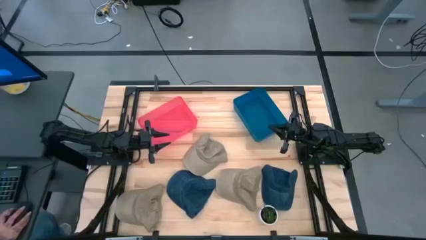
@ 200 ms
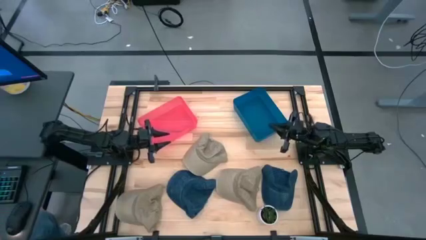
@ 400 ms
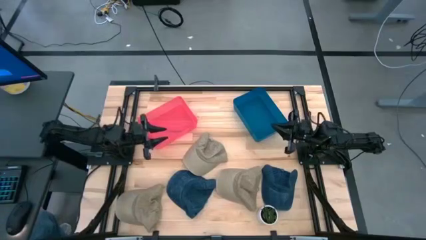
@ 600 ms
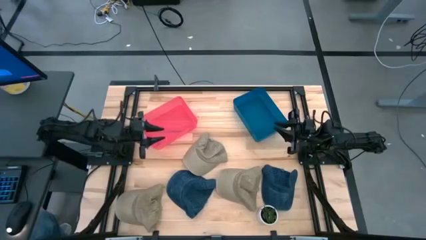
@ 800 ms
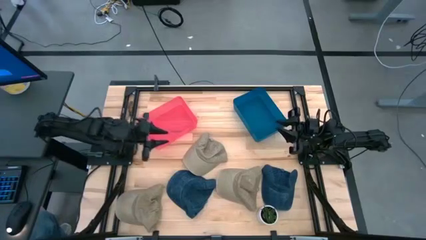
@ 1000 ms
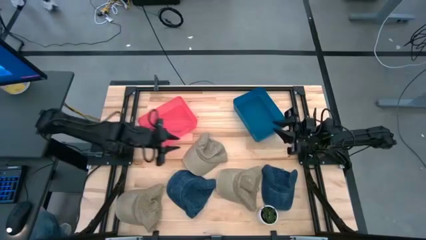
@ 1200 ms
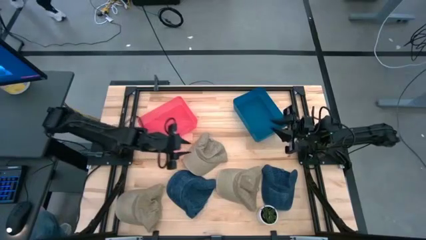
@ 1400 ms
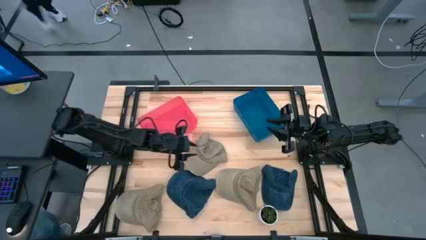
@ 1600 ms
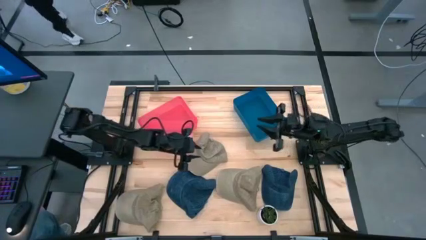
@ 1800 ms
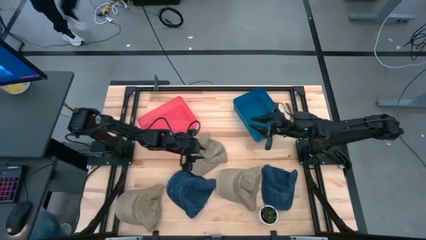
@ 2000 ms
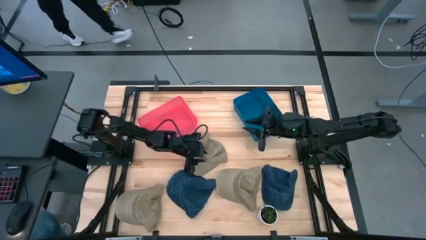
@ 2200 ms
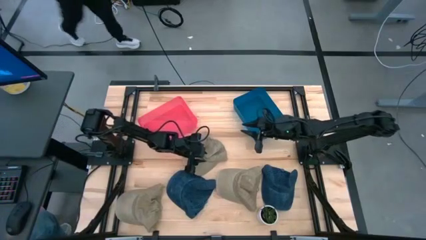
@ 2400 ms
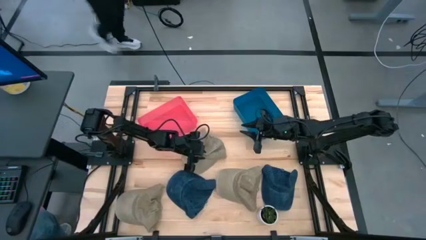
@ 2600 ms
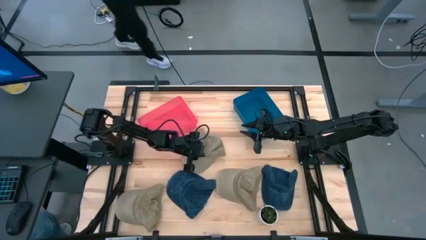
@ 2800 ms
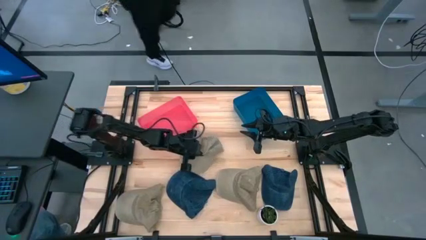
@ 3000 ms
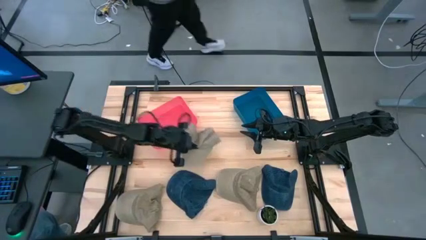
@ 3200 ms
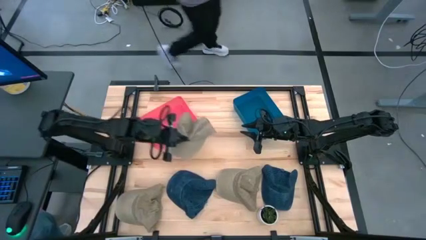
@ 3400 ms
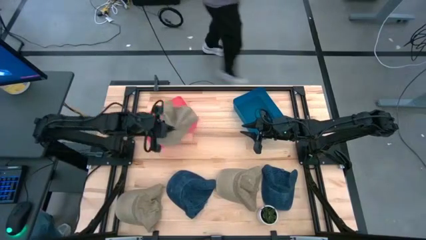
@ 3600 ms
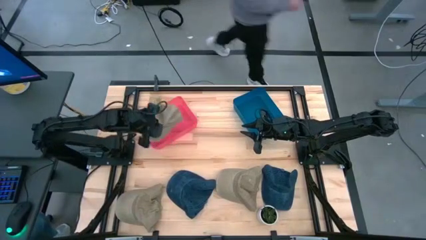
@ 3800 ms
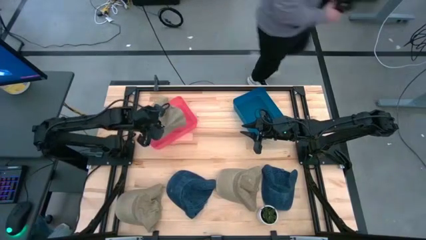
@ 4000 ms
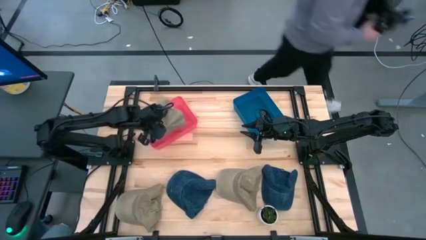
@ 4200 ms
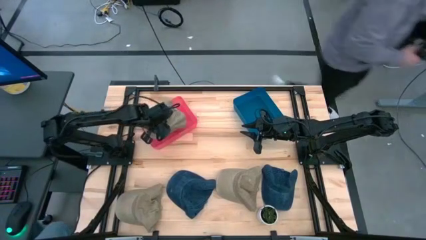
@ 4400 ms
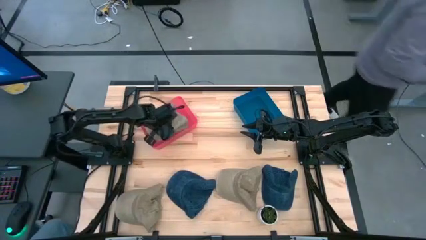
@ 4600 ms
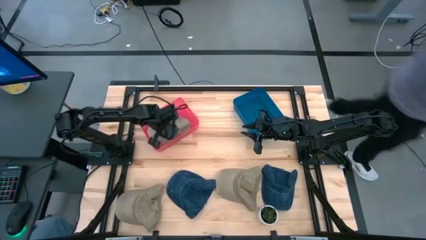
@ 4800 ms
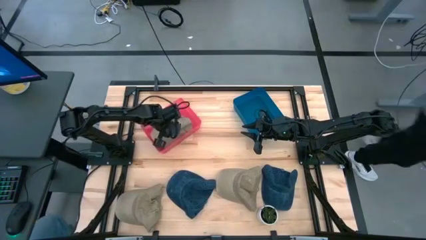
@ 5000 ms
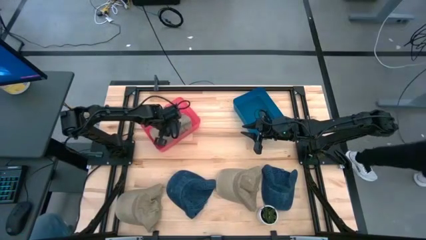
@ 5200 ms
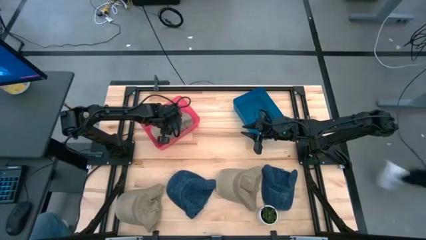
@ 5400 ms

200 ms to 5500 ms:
Task: Pick & Place hat
Put the top brown cap into the red bin

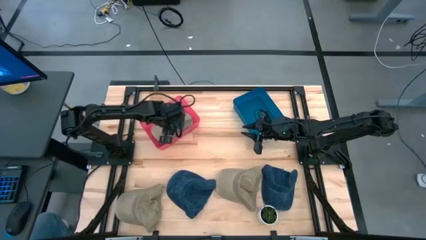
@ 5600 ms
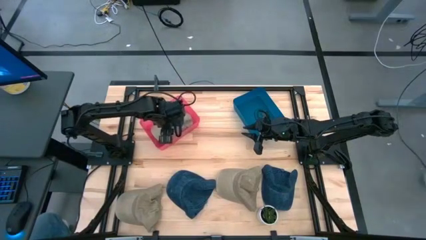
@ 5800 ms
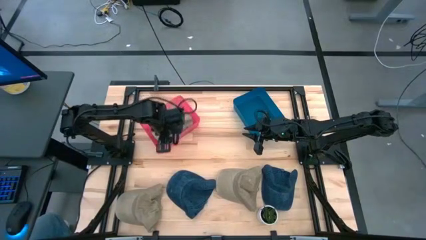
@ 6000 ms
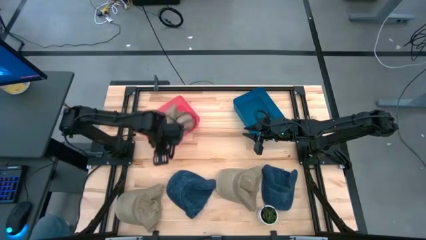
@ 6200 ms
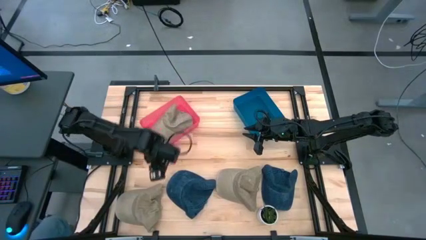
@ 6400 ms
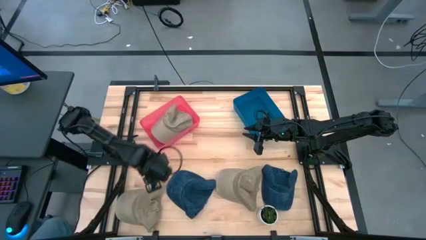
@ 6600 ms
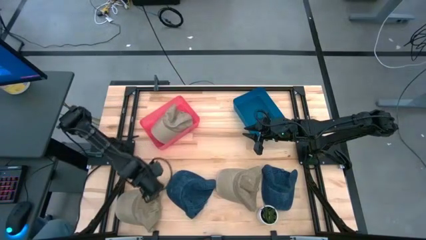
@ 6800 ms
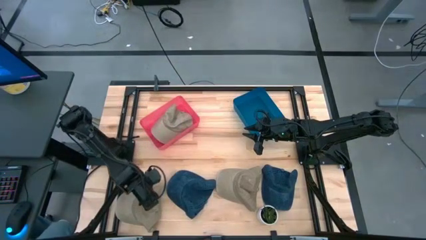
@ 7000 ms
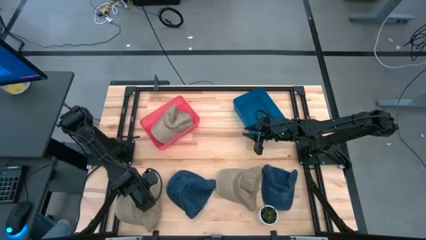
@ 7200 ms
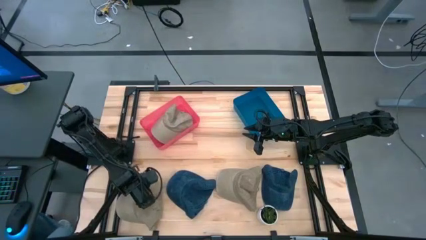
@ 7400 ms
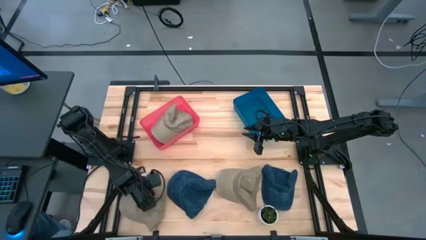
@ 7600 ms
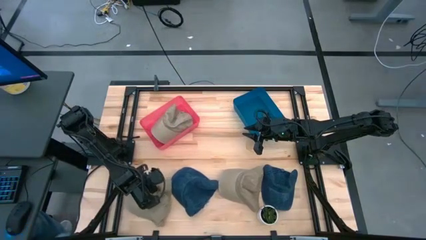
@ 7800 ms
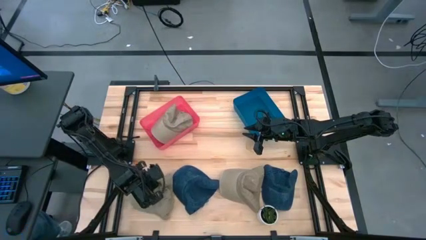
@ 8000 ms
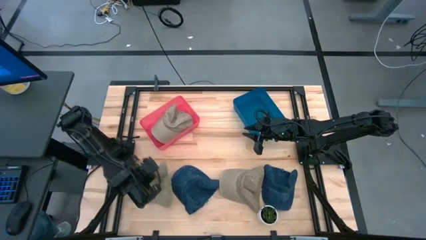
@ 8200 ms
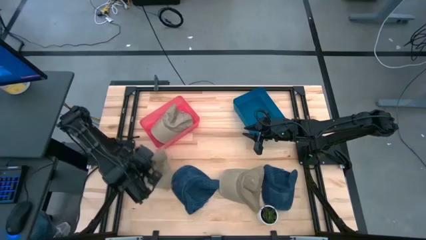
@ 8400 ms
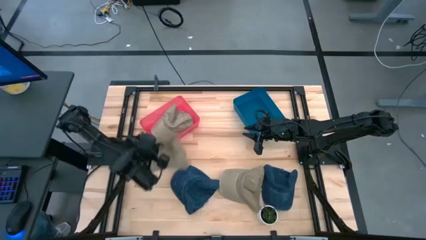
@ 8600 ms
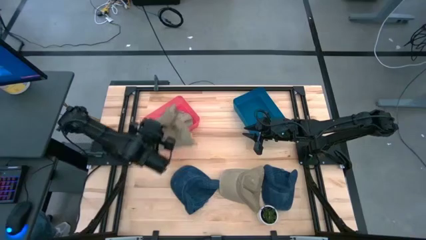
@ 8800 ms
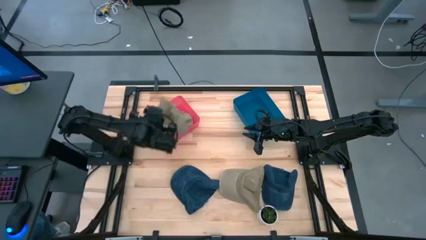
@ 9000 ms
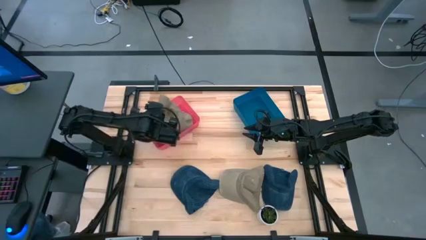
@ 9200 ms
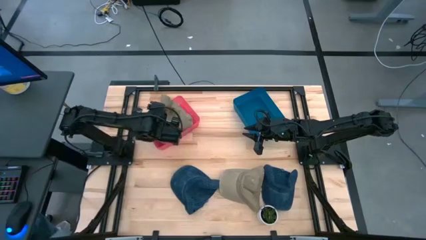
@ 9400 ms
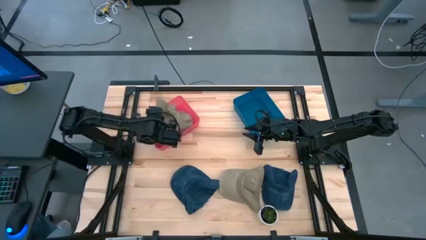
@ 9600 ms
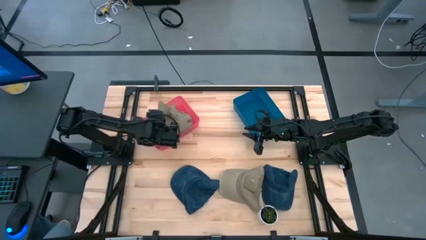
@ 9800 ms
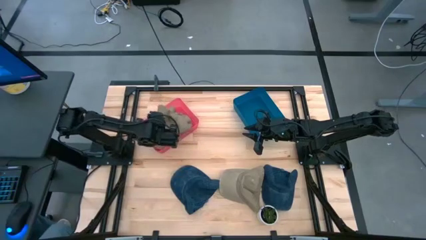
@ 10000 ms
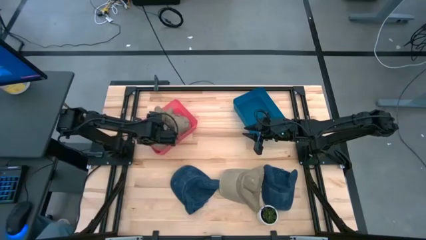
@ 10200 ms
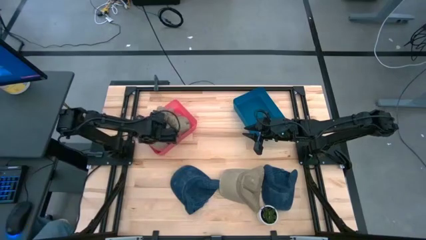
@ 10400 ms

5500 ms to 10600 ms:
Put the left brown cap into the red bin

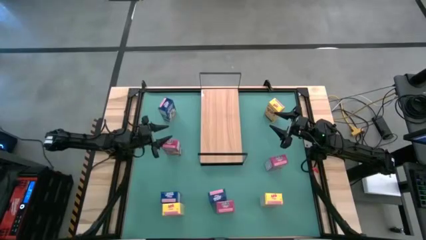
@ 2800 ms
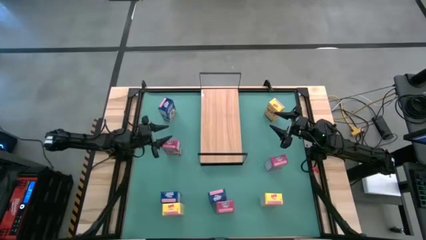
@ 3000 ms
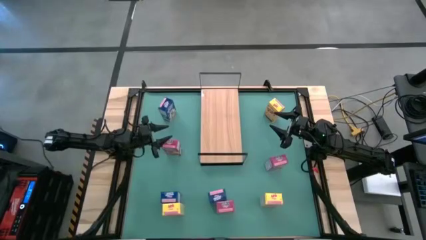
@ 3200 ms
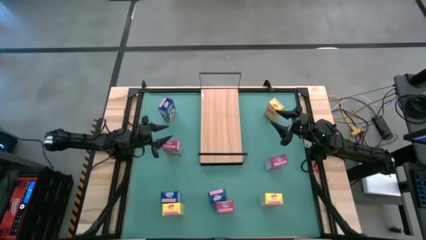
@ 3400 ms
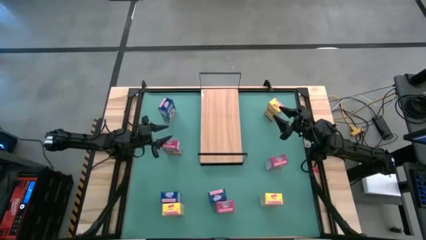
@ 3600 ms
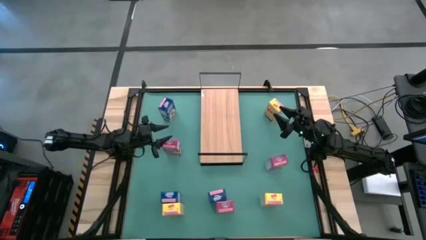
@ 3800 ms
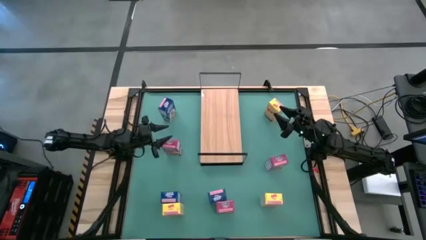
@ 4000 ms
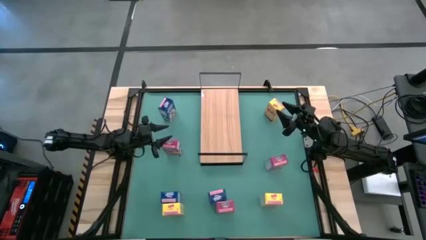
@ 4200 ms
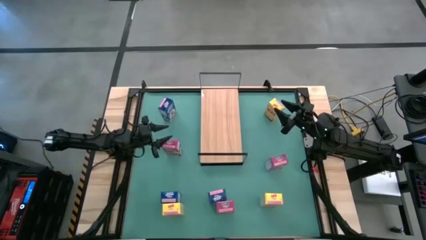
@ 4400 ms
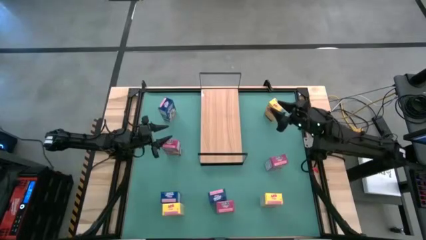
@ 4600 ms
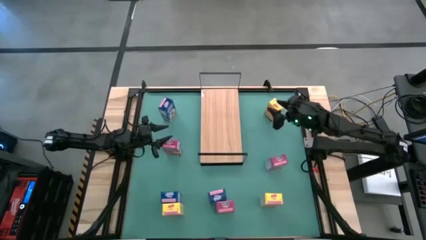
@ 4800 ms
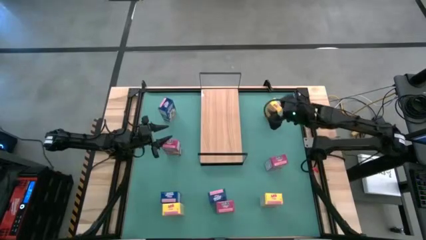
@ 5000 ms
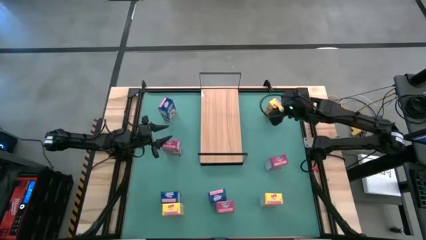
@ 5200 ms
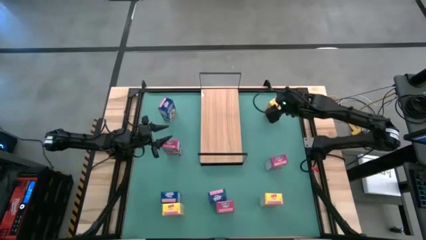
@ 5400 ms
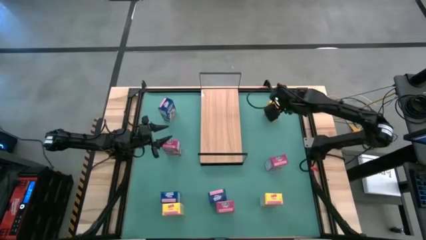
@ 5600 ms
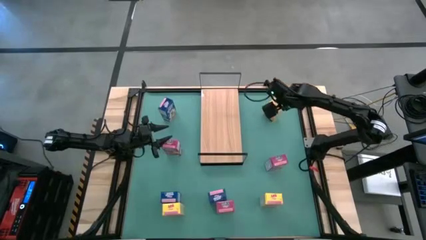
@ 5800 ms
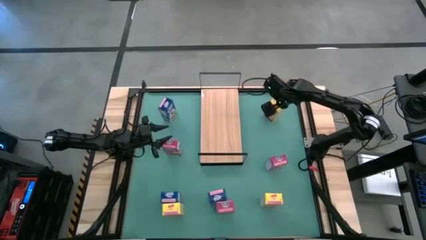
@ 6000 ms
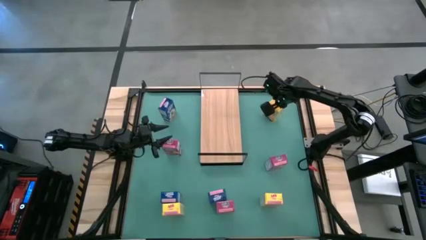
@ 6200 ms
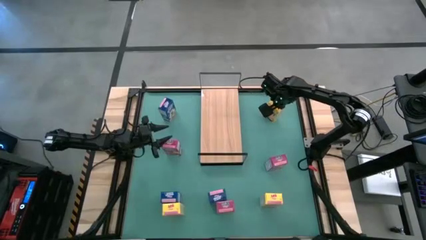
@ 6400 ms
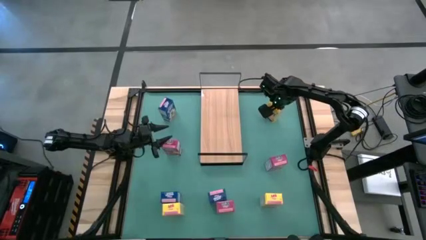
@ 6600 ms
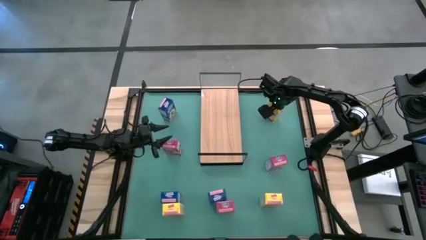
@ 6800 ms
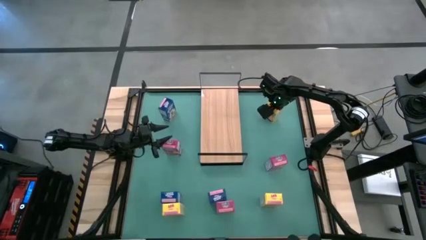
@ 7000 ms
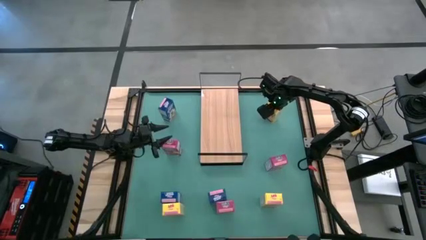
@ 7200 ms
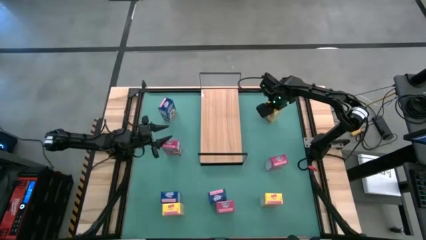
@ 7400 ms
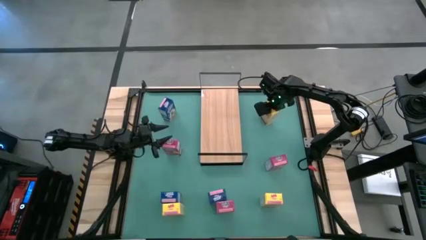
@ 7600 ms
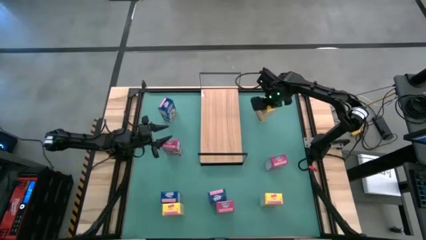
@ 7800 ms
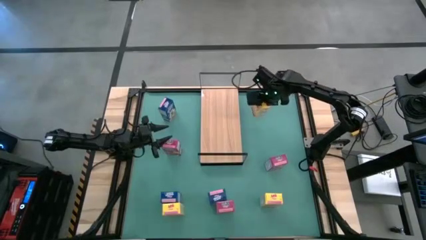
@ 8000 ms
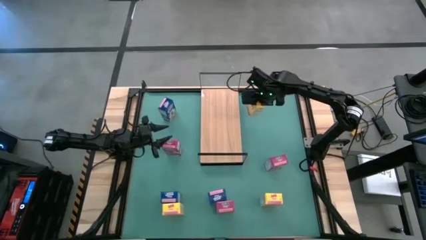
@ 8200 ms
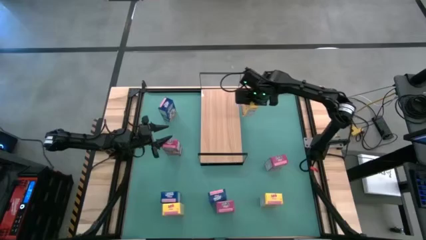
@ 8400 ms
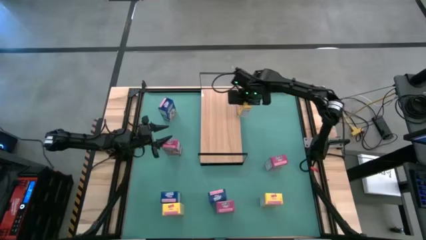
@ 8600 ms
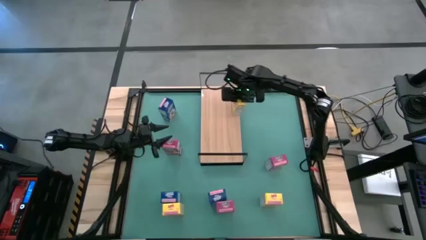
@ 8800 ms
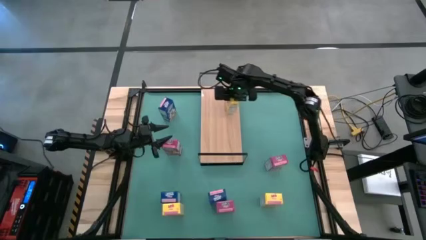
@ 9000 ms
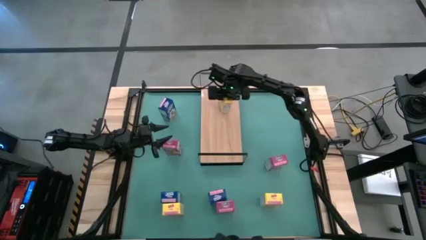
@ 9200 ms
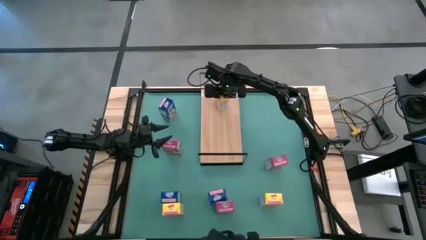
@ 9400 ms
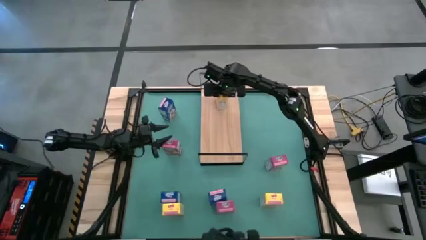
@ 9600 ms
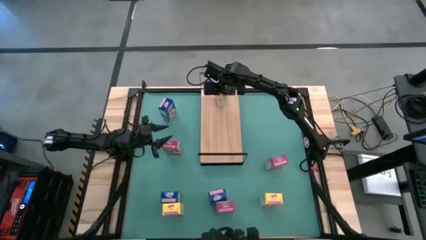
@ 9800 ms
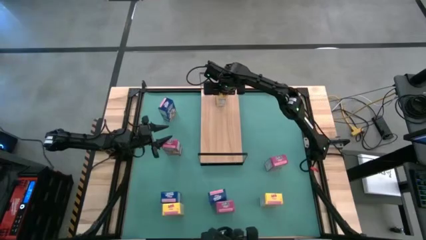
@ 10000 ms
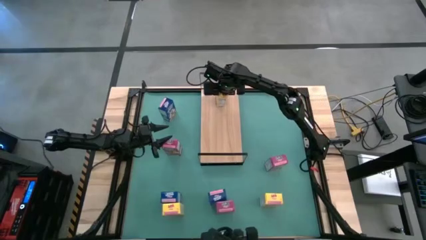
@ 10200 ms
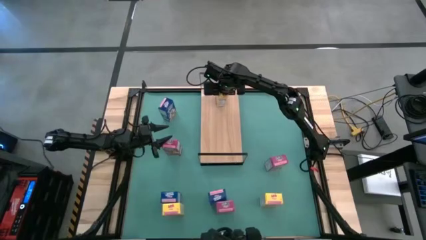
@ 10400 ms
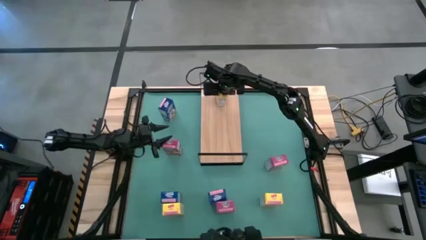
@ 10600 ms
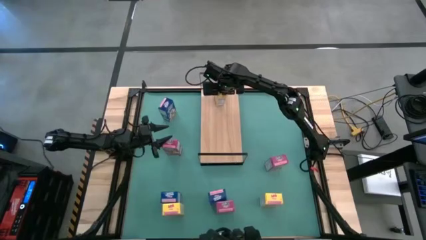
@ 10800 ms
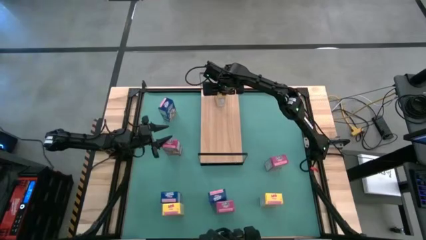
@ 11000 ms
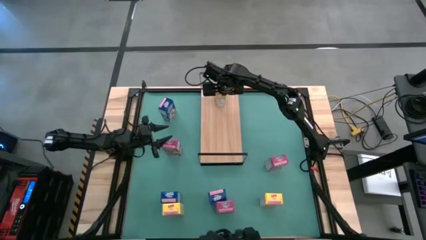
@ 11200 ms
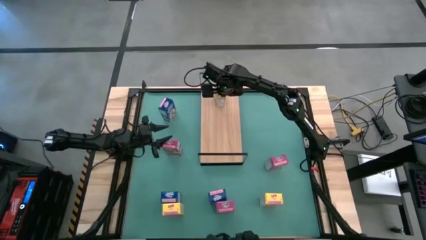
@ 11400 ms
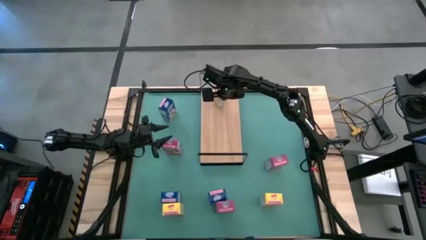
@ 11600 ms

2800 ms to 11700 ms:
Task: Stack cereal on shelf
Put the top yellow cereal box on the shelf
